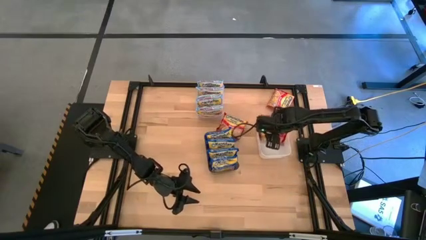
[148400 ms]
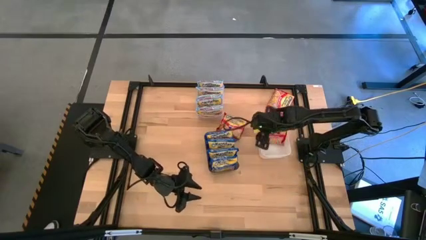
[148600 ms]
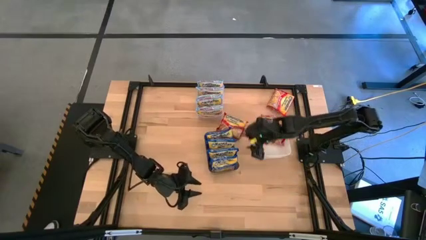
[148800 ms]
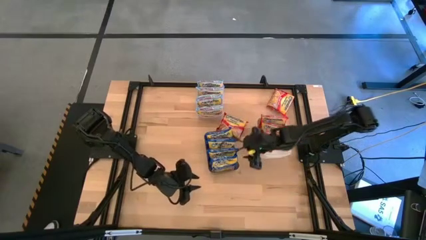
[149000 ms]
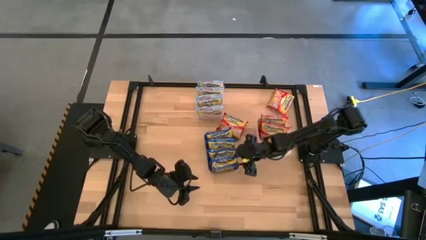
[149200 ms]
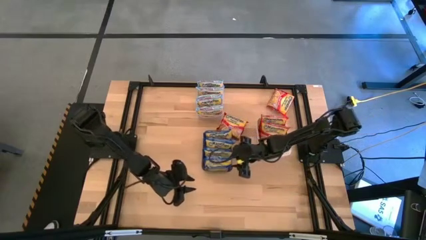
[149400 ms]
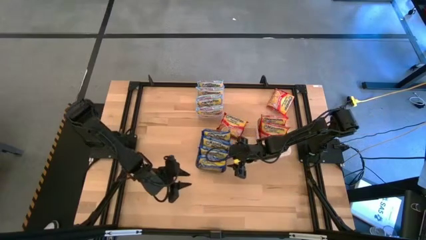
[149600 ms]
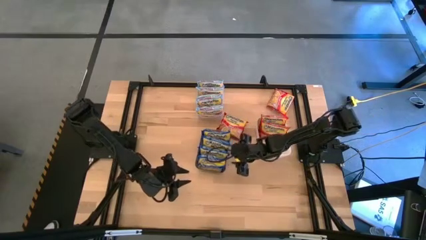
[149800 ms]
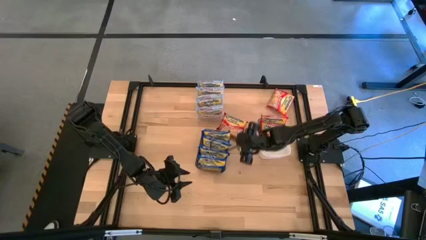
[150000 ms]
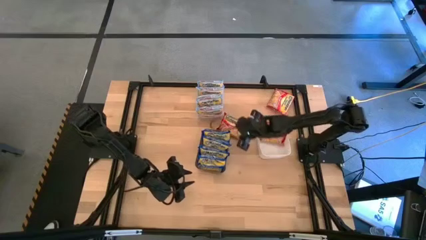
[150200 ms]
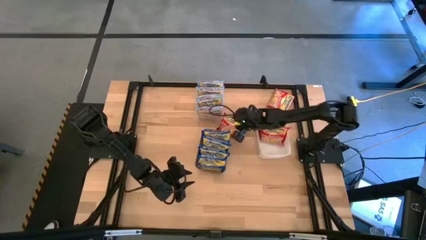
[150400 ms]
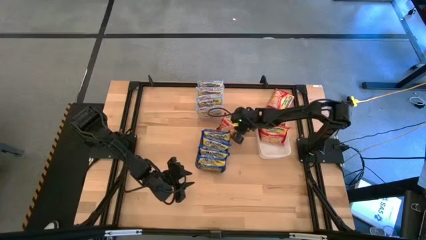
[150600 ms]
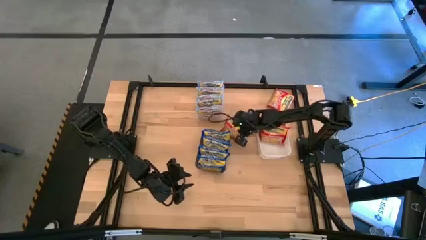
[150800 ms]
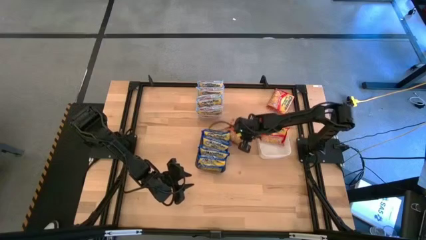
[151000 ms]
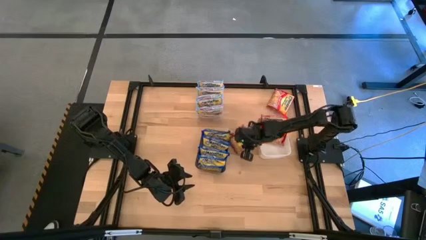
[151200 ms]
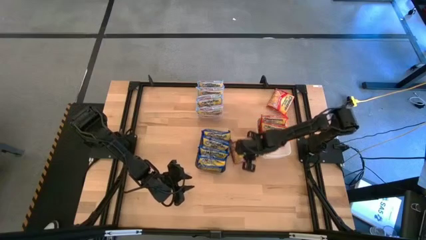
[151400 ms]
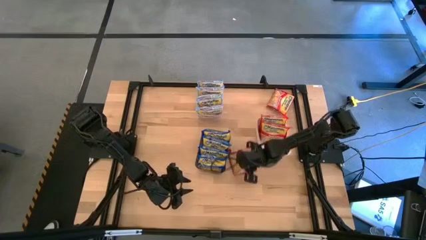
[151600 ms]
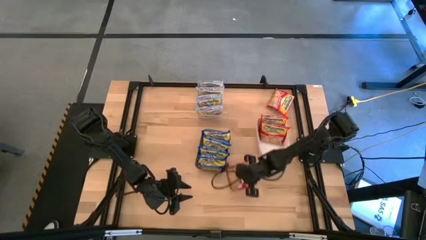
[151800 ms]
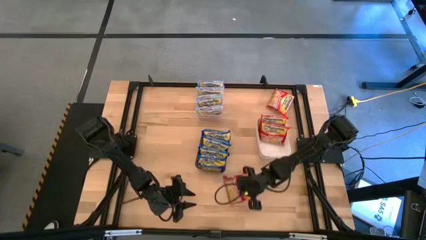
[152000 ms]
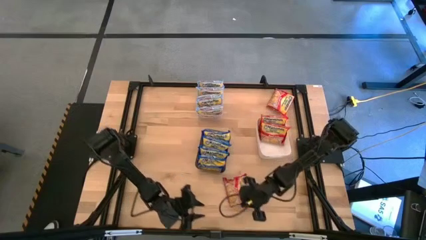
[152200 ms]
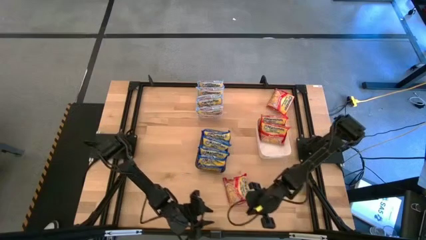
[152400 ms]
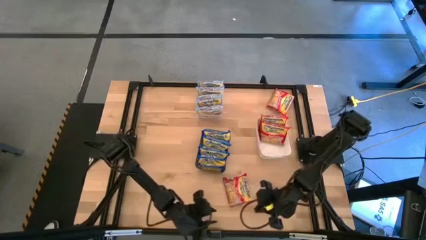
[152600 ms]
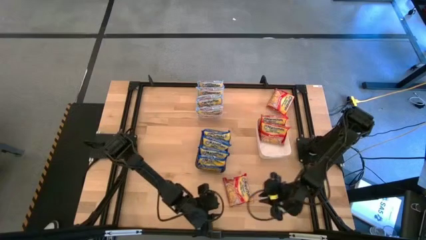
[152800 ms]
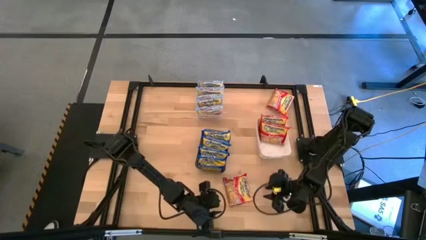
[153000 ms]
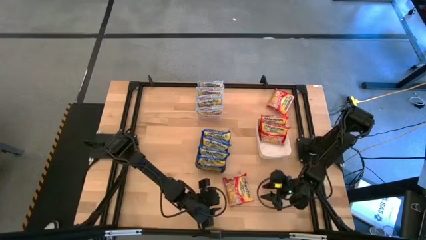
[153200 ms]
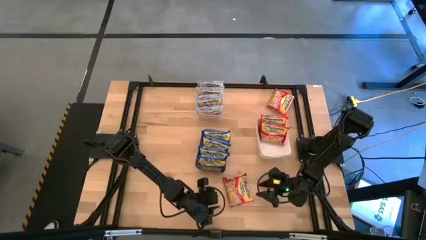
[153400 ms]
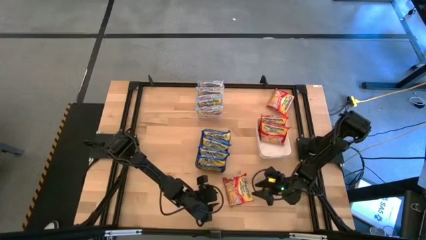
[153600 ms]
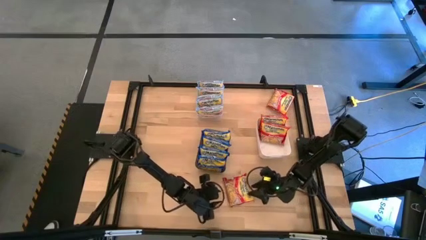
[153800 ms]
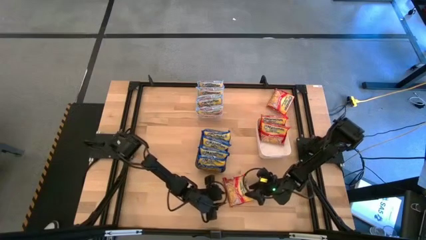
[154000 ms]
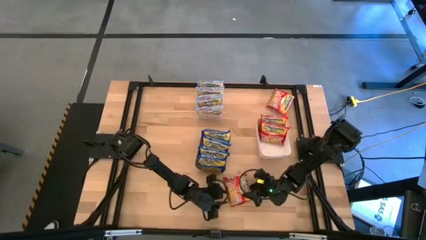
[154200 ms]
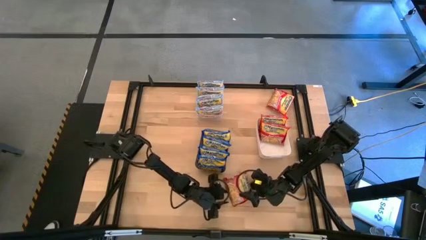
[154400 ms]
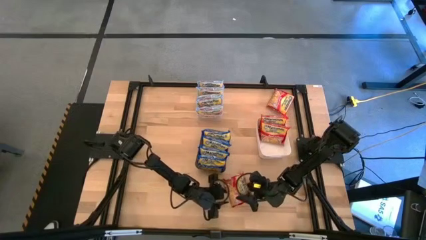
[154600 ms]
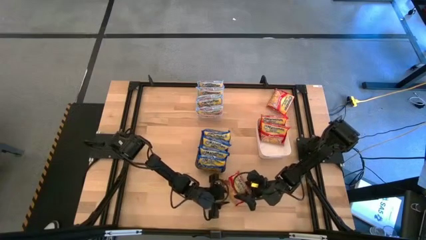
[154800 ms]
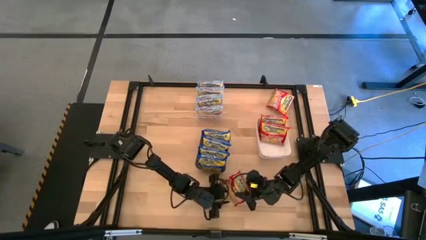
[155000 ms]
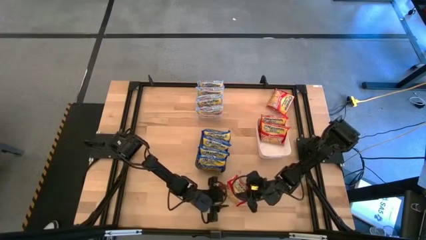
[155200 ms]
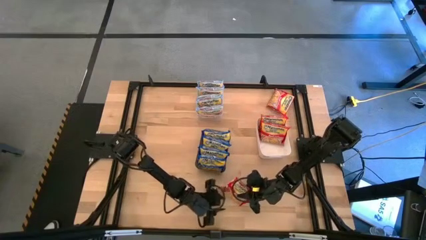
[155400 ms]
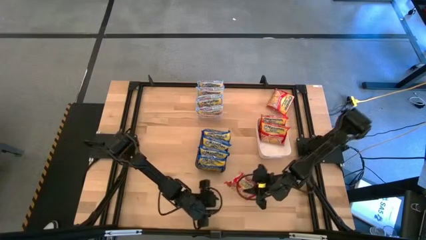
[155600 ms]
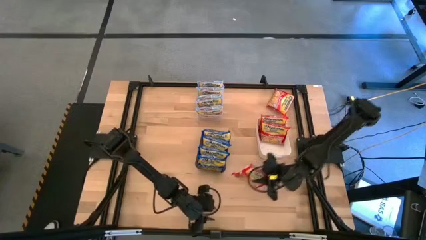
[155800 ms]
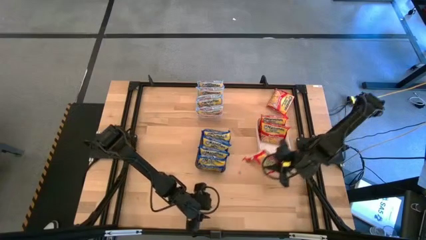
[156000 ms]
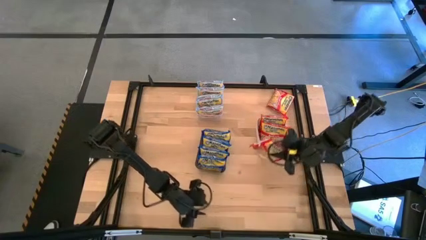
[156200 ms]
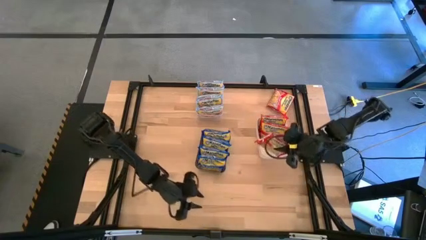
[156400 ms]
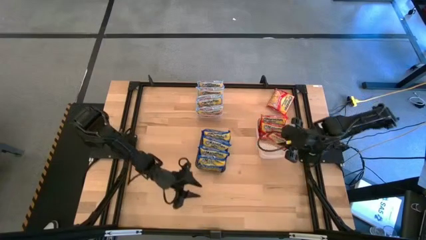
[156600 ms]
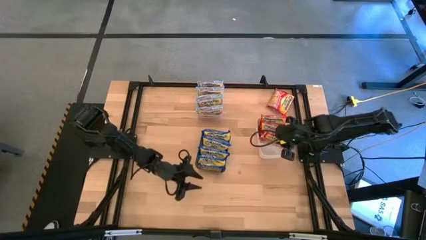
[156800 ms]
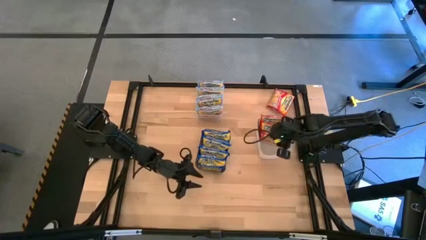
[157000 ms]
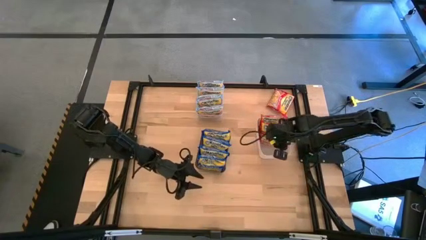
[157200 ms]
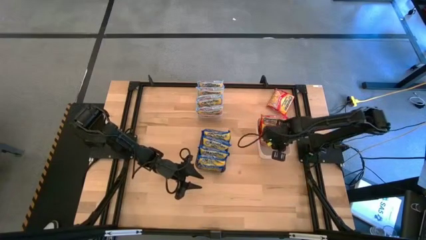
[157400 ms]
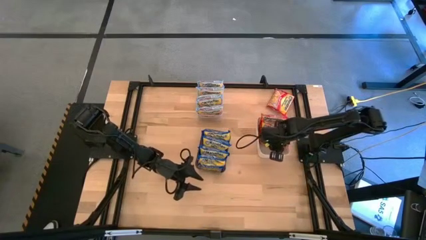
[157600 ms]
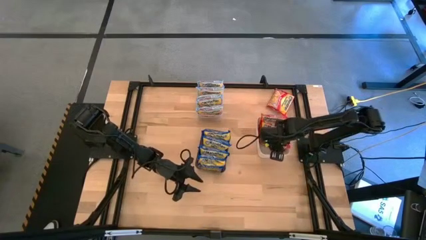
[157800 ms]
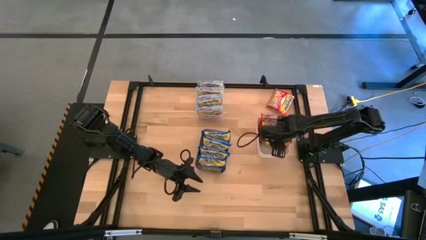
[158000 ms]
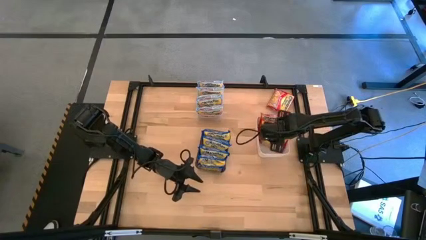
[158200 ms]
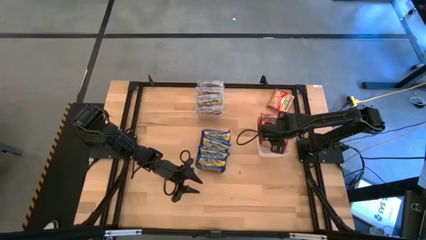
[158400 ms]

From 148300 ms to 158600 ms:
Task: Sort Maruchan noodles
Put the left red noodle pack into the white bin

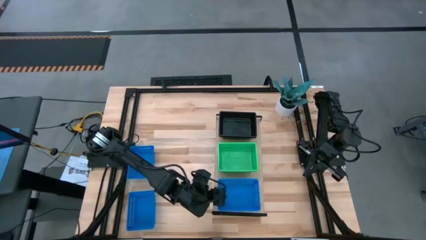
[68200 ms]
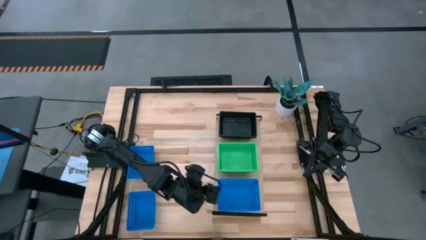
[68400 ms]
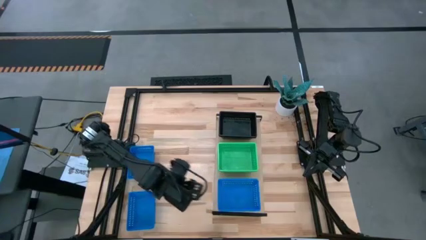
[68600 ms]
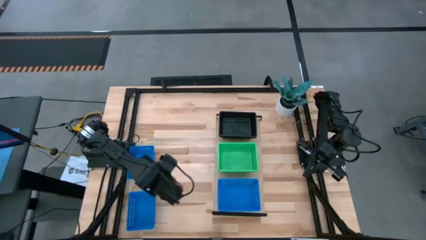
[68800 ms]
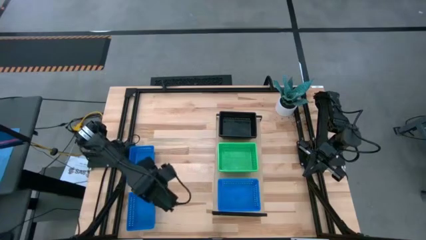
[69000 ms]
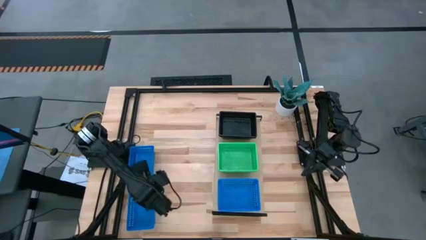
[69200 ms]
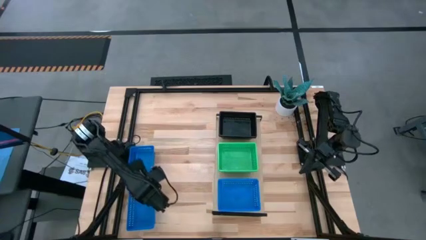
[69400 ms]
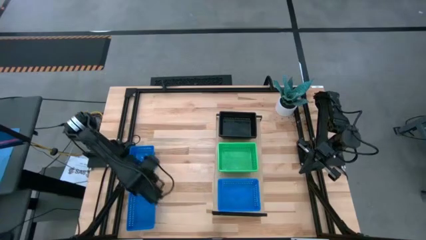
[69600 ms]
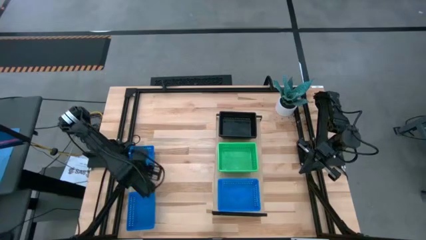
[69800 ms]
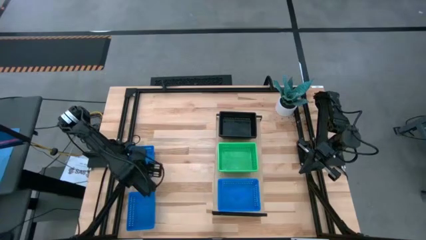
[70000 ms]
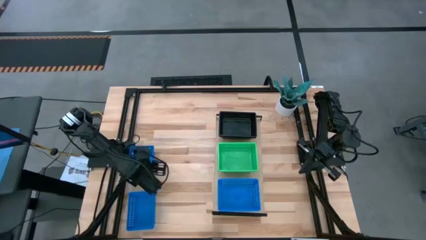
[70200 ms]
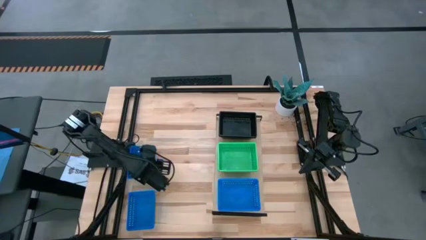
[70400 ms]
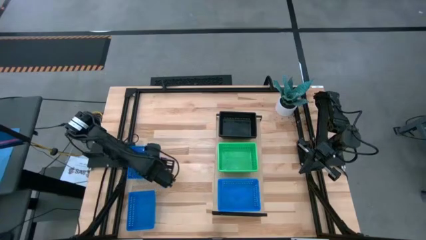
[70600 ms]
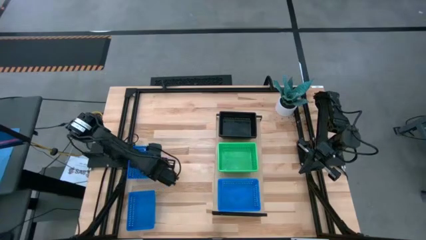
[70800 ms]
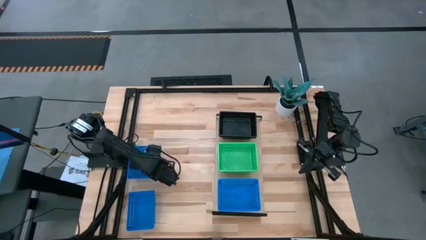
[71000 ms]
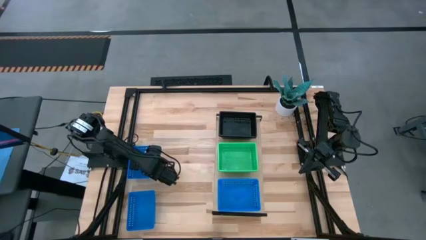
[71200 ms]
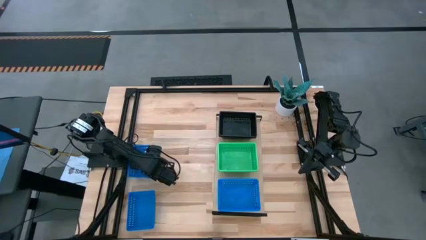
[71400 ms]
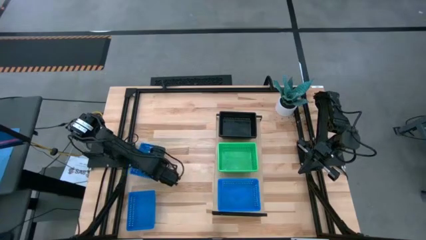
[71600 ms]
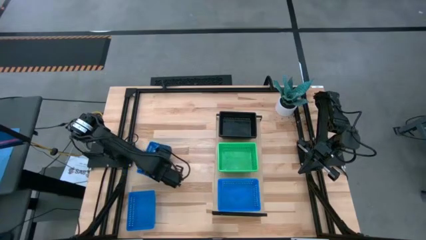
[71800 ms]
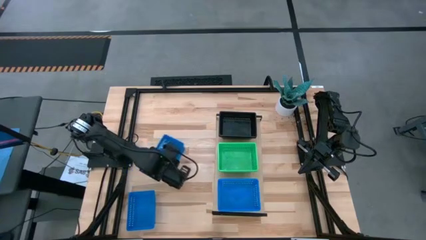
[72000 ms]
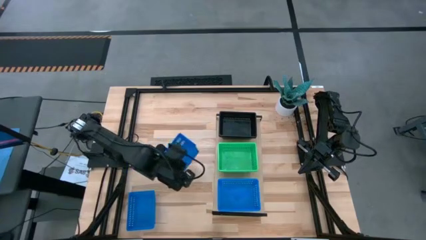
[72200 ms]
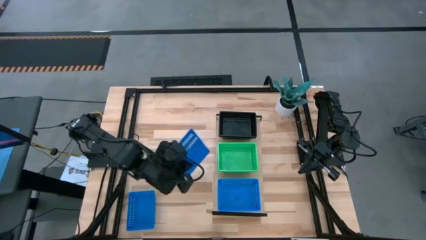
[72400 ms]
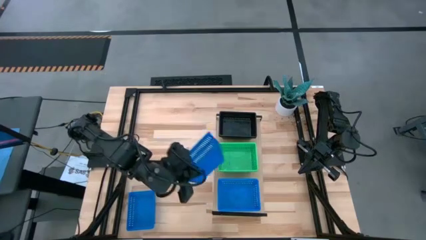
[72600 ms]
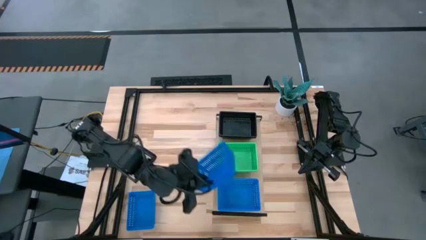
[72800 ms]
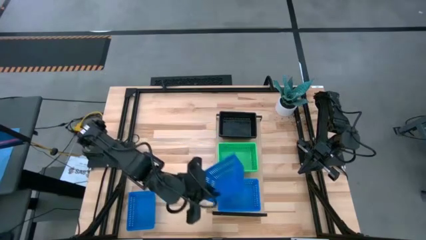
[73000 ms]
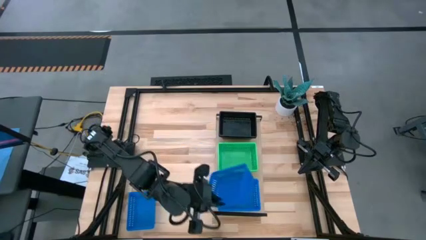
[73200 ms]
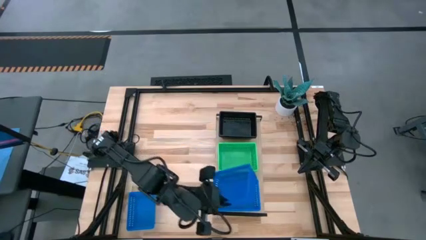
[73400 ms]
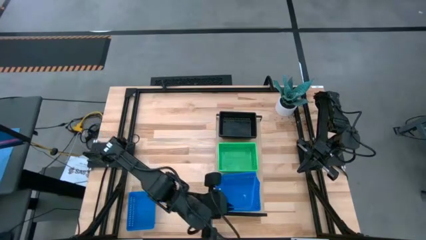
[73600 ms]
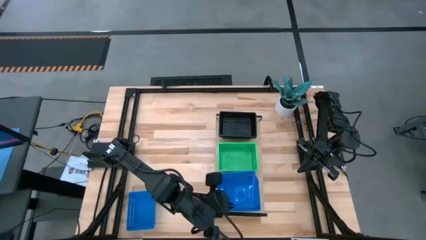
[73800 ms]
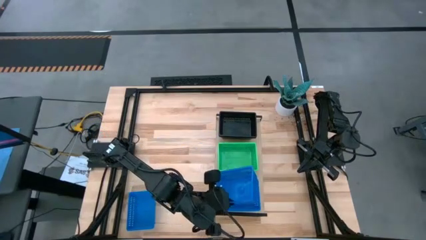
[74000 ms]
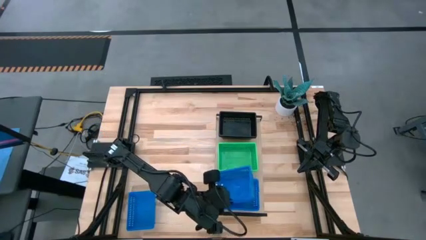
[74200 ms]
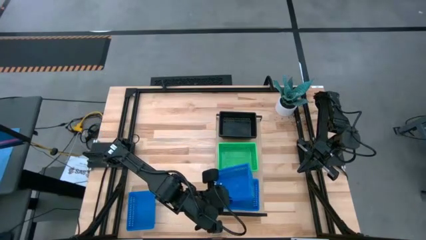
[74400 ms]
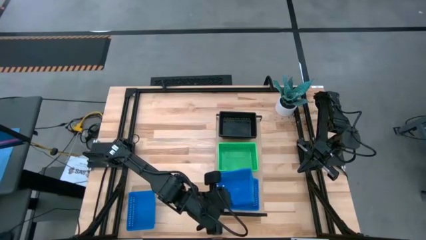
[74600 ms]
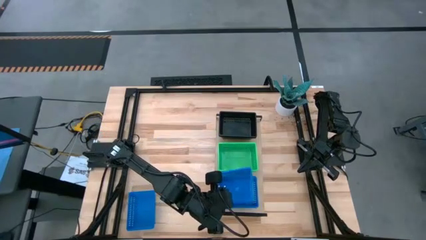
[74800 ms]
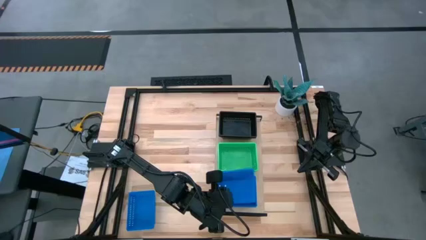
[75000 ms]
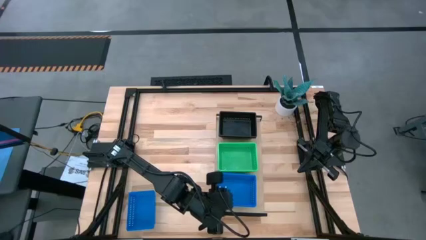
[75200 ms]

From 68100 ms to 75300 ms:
Task: Stack baskets on shelf by color
Stack the top blue bin into the blue bin on the shelf
